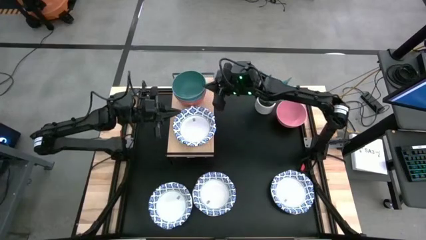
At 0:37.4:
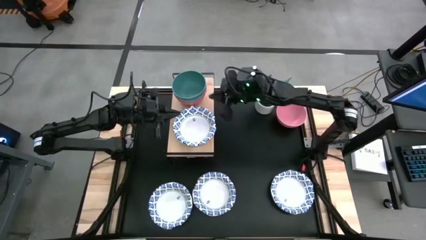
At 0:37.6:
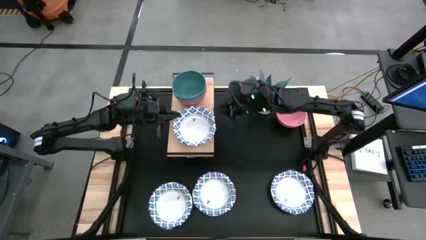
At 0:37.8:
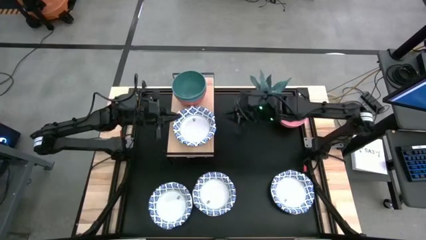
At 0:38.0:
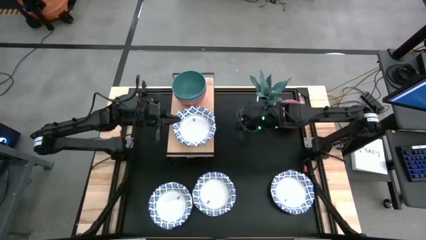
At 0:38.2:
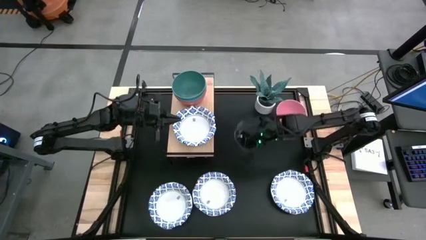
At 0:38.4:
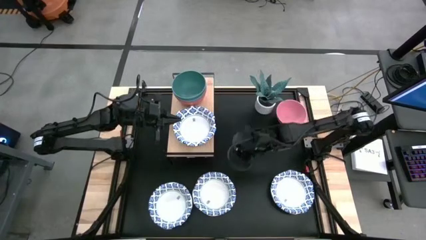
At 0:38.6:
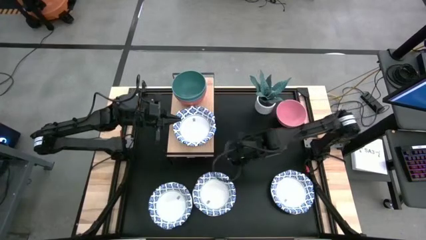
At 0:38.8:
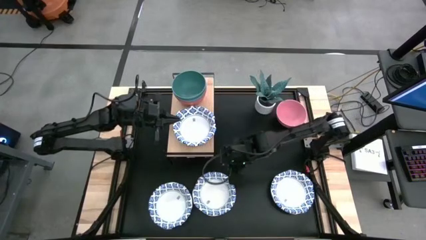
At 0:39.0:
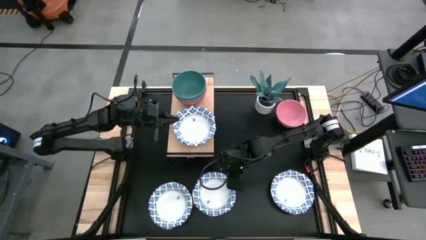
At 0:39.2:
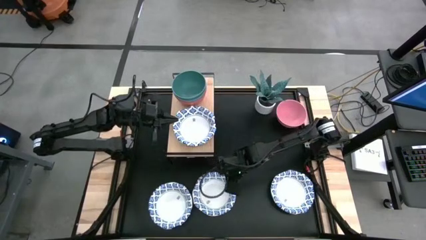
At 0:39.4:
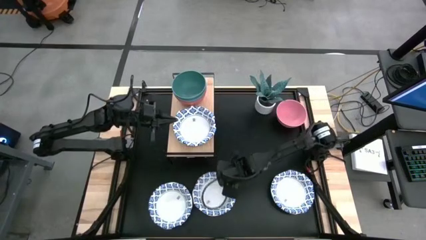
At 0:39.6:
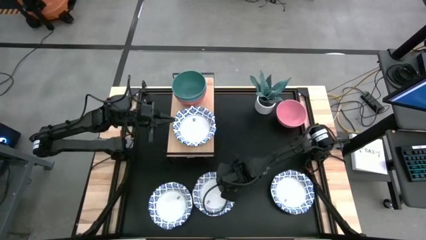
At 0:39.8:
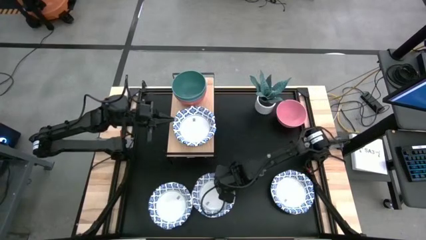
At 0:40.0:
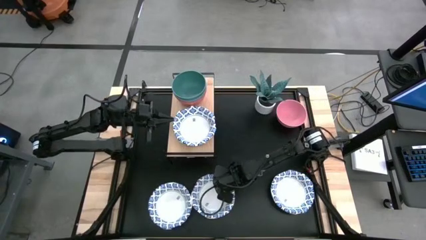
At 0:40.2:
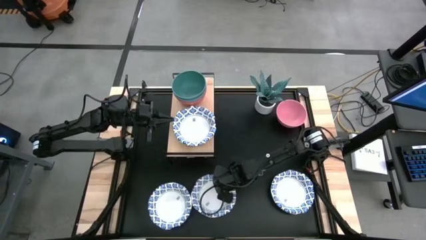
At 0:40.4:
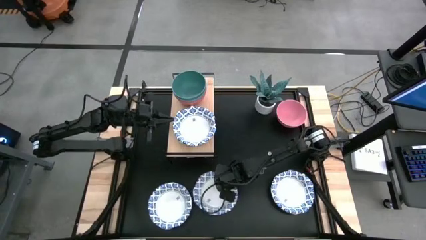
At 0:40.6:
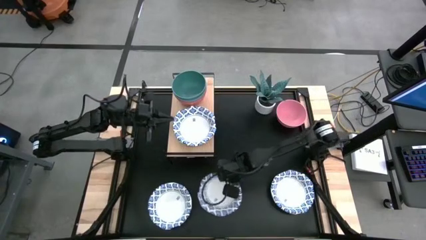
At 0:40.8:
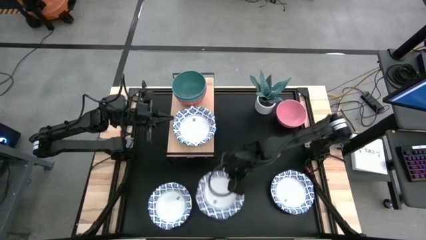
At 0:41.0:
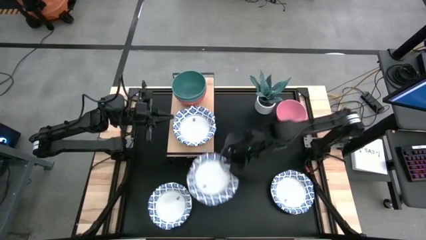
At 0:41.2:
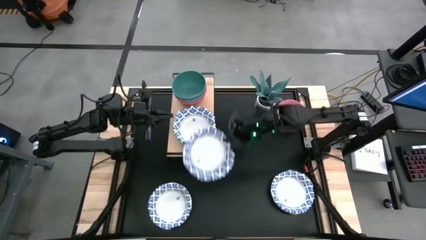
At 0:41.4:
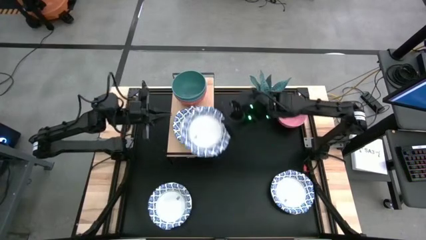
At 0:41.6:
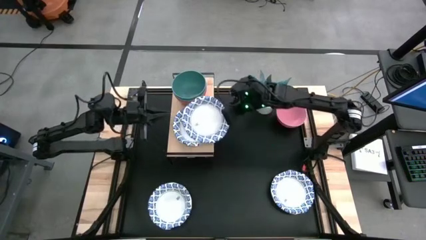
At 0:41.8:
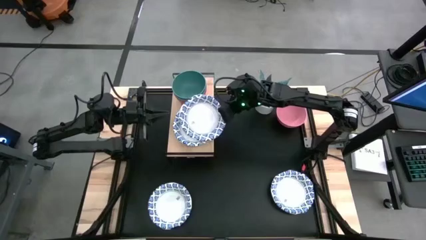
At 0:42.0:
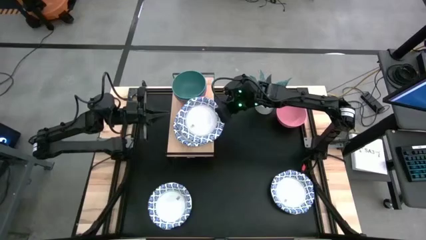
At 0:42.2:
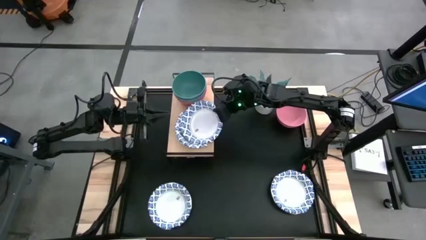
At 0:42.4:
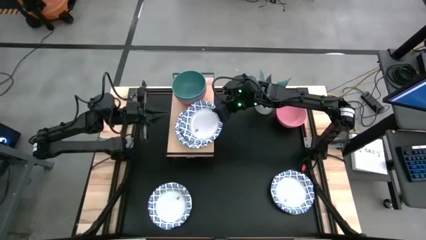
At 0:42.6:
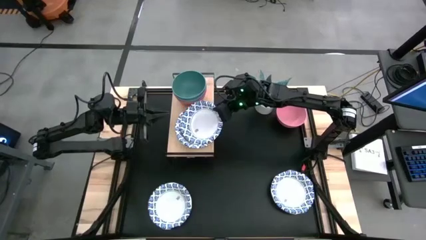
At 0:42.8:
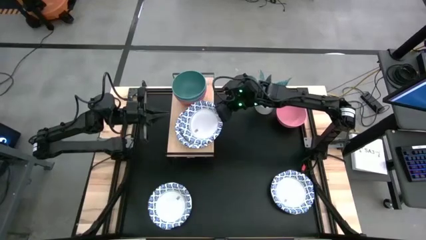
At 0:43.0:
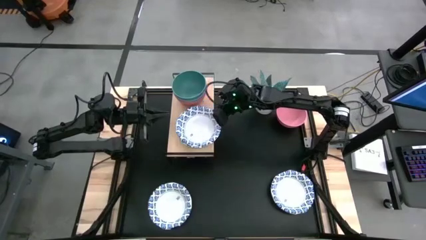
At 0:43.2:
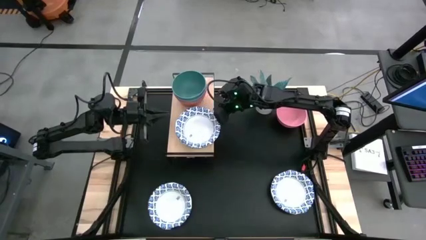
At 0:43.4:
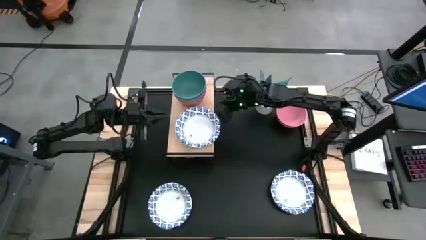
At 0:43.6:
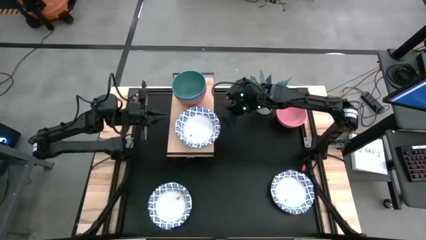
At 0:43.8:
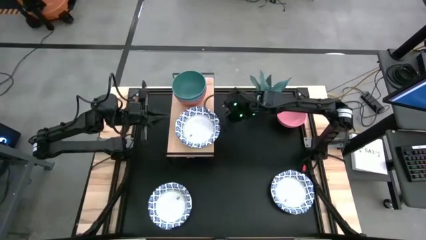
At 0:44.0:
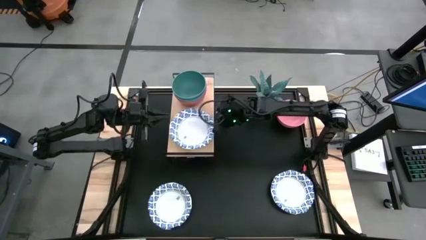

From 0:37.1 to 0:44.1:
Task: Place and stack bowls onto a shelf
Stack the white bowl on the white bowl on the shelf

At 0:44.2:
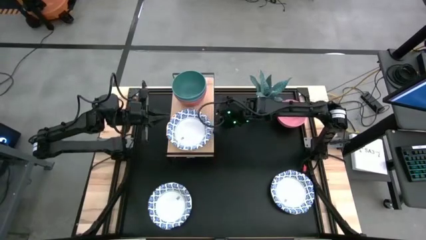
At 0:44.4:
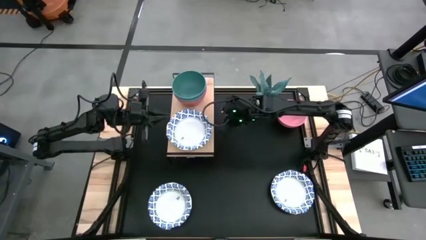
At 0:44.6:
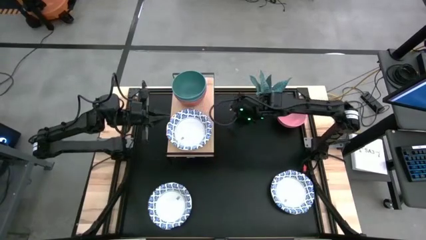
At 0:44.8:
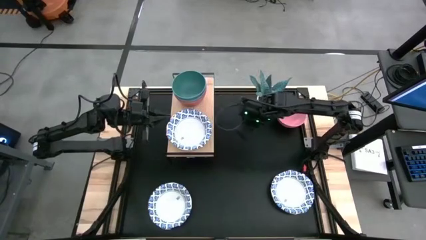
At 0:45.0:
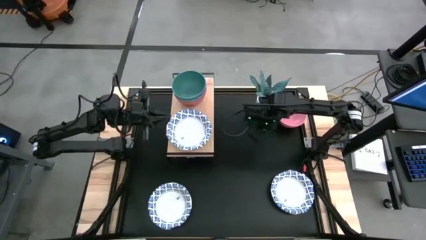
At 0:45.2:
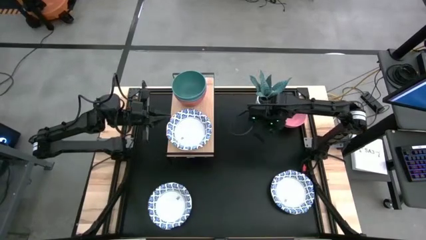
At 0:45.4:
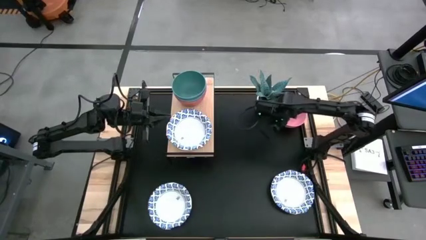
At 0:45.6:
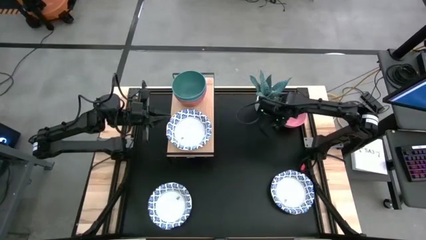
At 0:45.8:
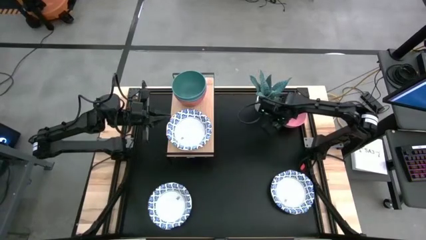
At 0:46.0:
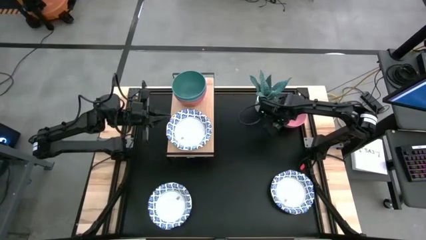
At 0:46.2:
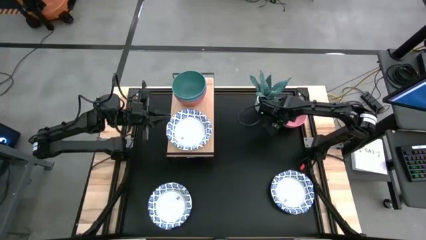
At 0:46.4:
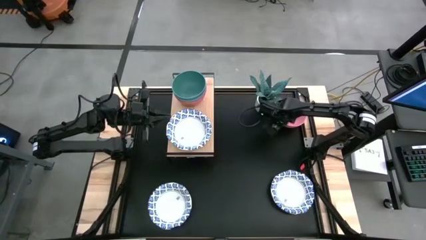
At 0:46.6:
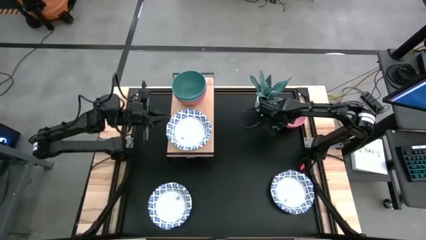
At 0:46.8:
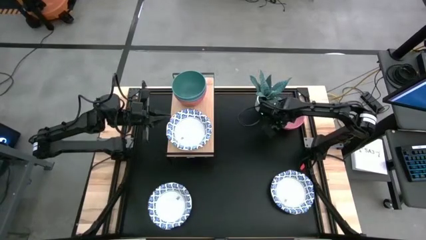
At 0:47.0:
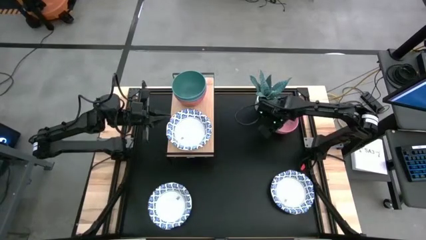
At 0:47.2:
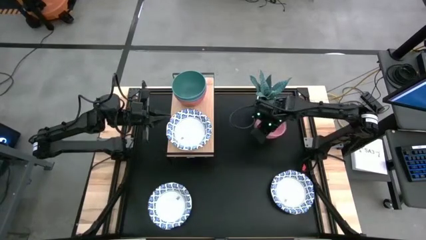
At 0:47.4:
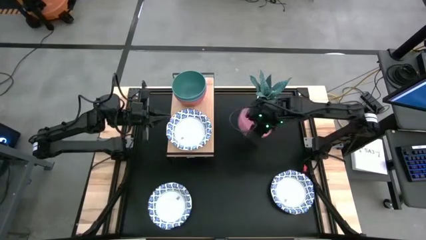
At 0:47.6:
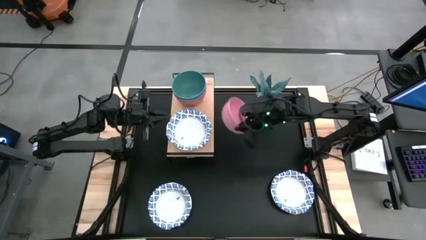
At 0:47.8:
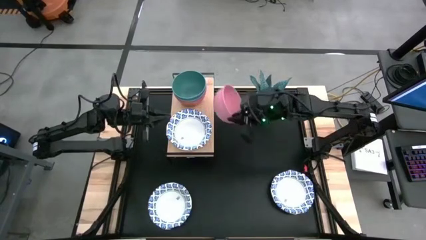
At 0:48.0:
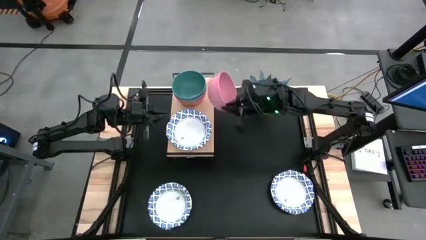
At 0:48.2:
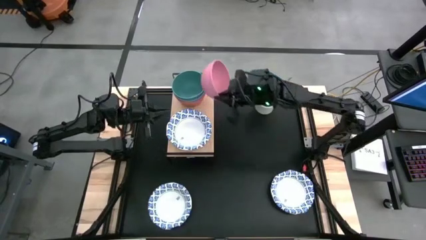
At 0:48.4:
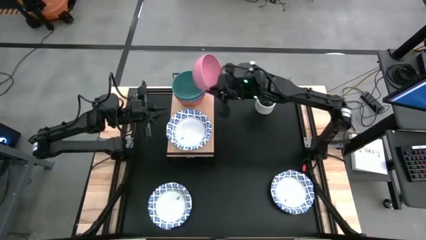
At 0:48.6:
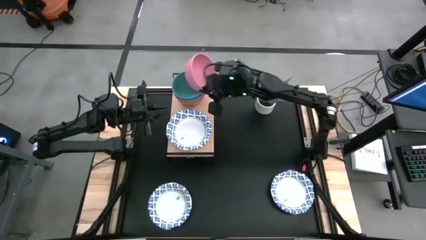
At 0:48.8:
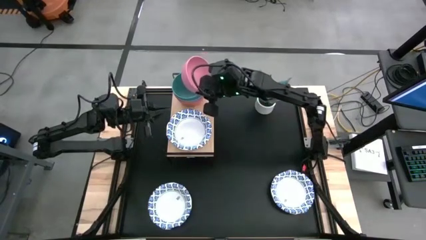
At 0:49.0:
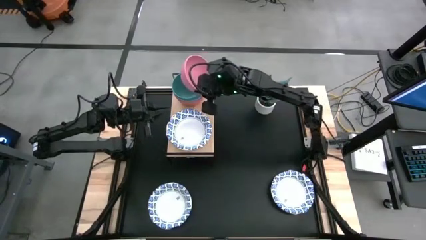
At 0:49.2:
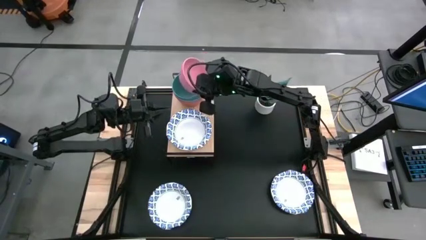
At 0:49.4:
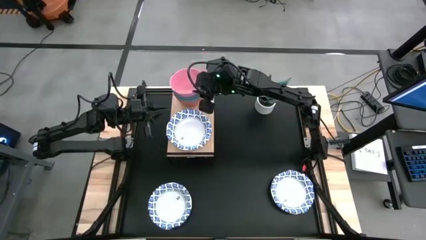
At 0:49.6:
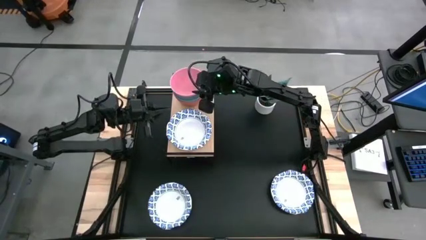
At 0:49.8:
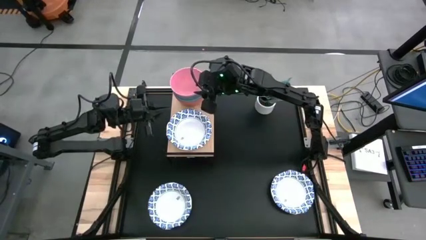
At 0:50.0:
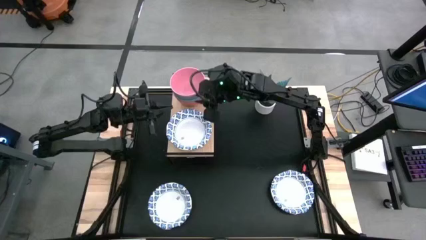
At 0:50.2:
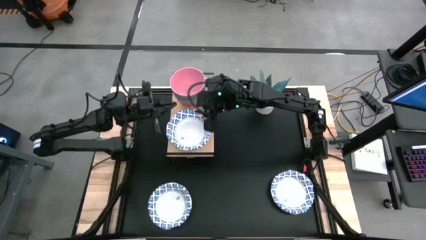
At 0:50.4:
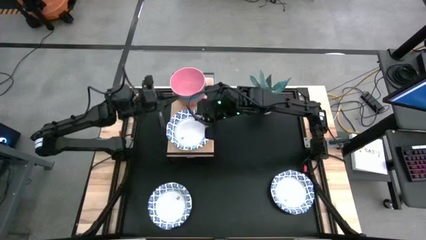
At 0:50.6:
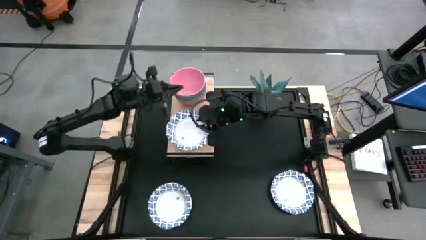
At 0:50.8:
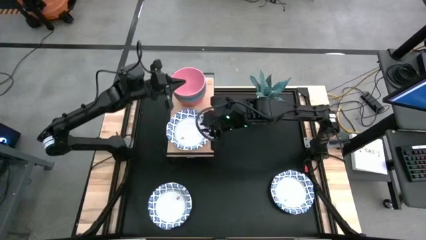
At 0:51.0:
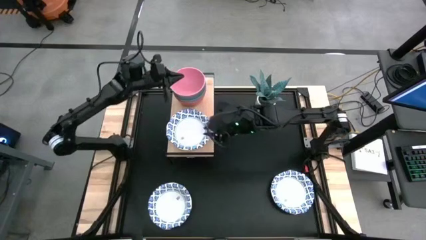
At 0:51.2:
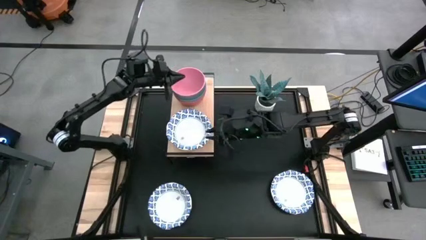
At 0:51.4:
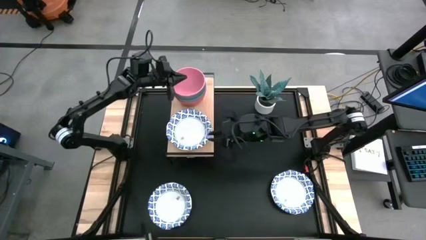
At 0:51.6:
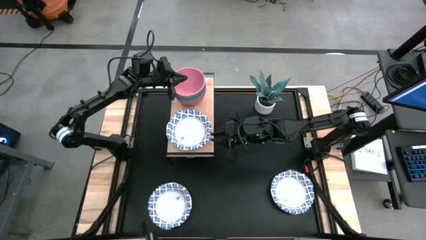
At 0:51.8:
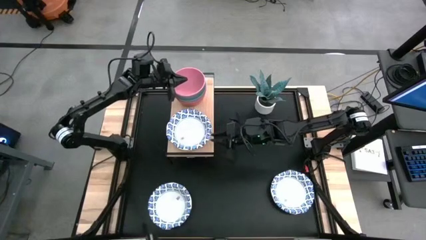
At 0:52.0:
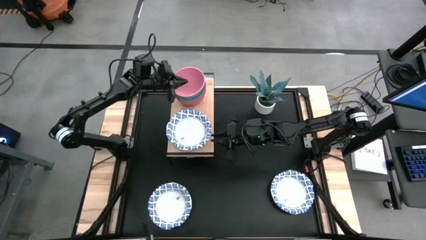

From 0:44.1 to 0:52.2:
Stack the pink bowl on the green bowl on the shelf

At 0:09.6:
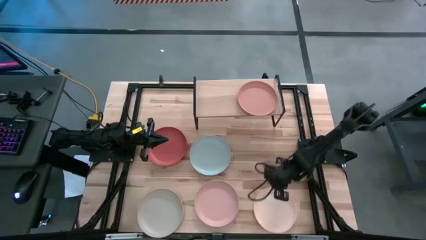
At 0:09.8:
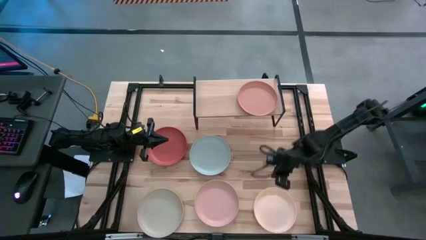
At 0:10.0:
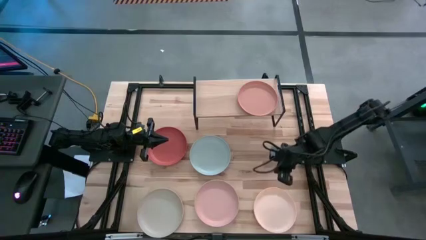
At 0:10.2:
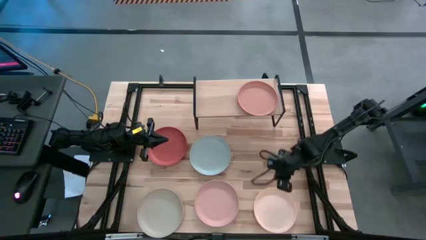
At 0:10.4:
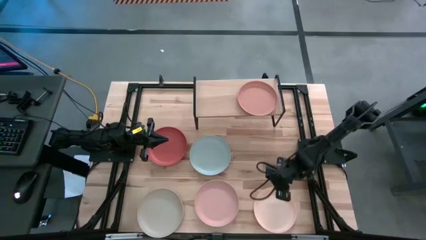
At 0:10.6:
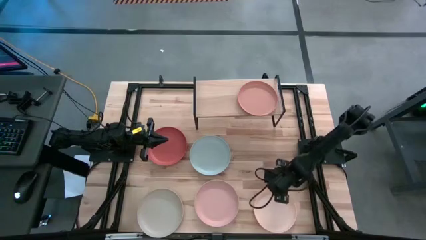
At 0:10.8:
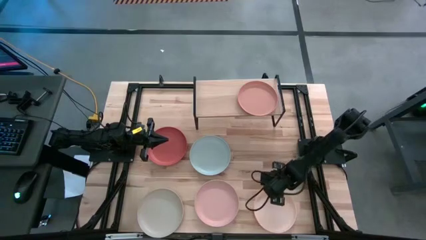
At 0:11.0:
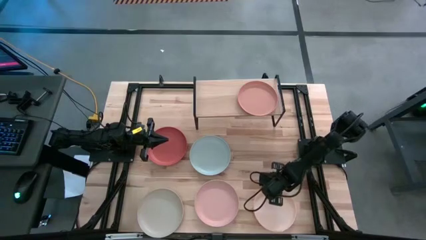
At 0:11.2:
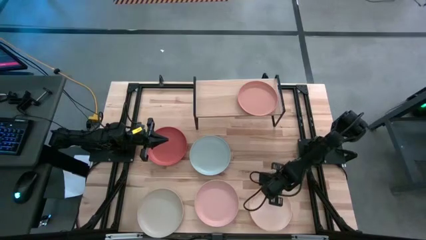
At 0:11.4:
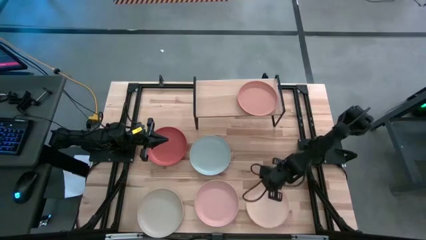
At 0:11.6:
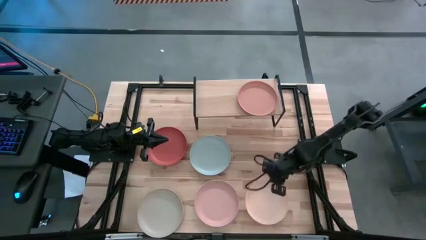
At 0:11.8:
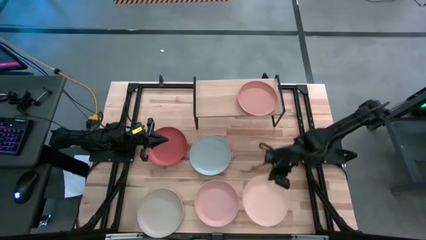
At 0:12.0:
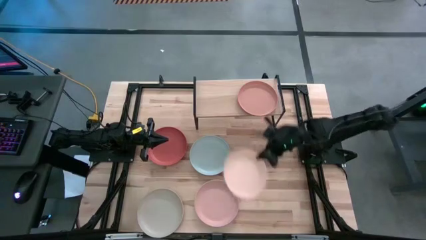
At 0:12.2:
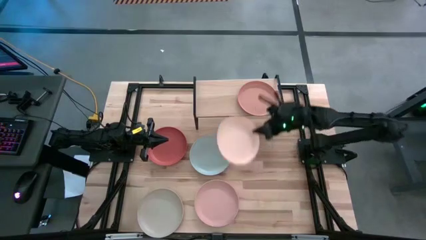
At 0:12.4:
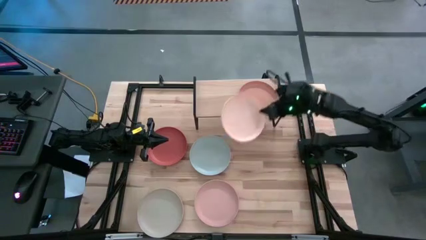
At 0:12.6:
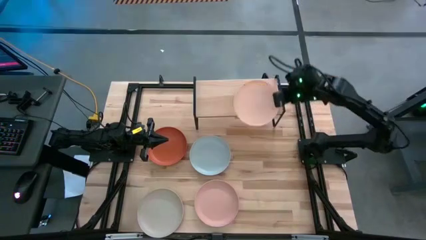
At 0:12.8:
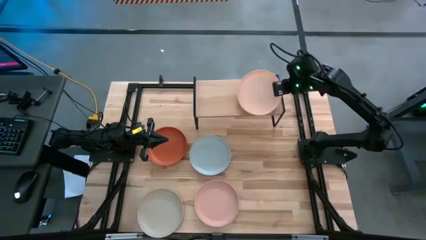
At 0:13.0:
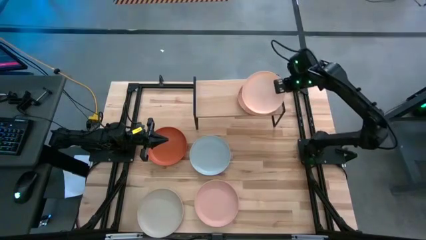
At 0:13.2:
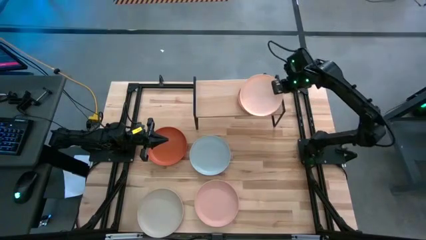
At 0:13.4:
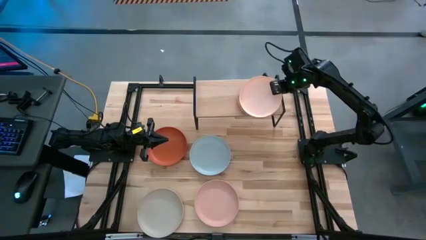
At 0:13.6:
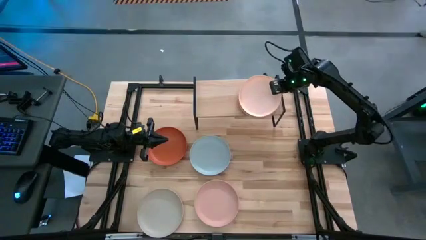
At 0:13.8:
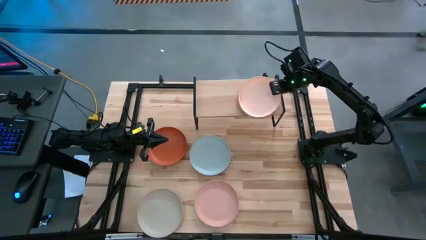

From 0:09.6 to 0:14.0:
Task: Place and stack plates onto a shelf
Stack the white plate into the brown plate
